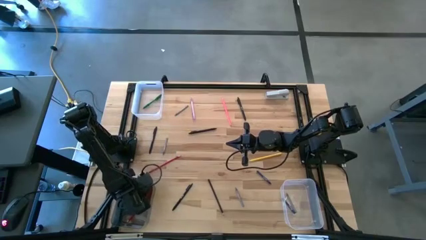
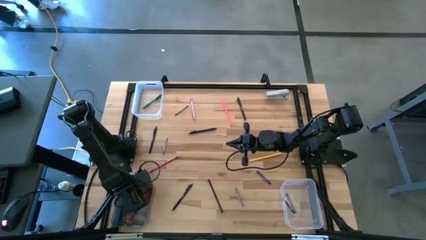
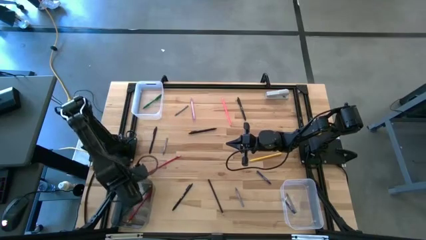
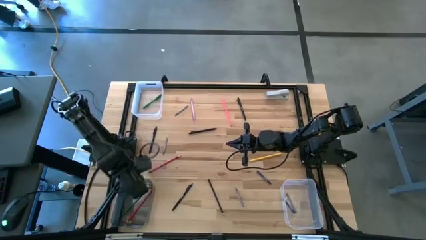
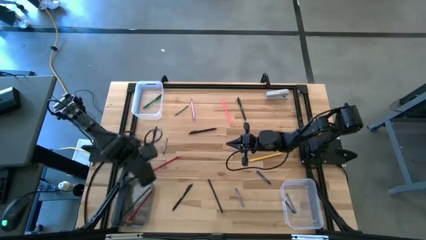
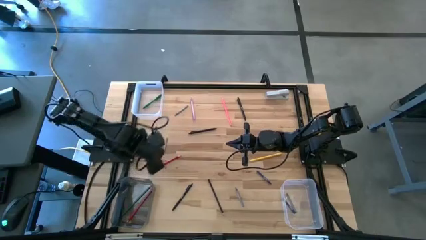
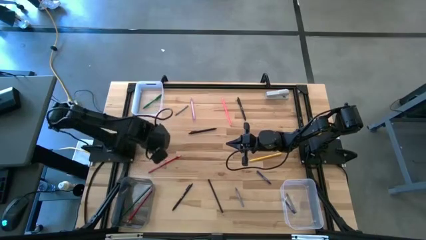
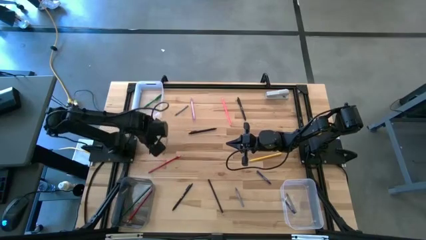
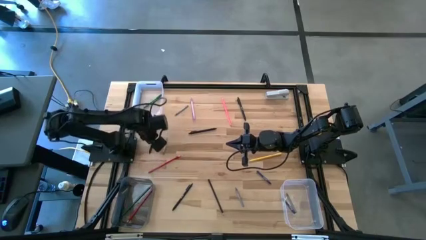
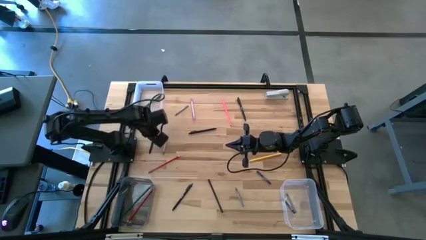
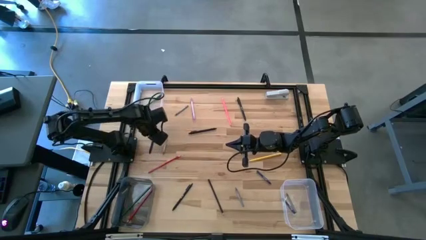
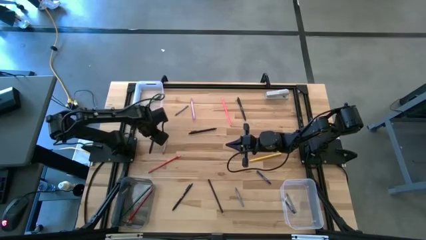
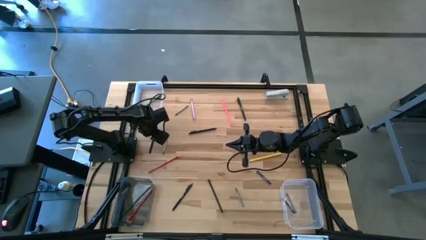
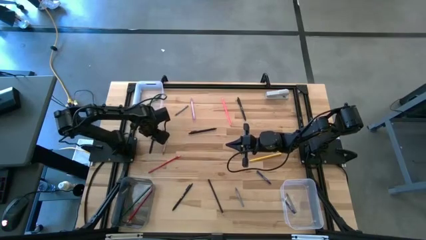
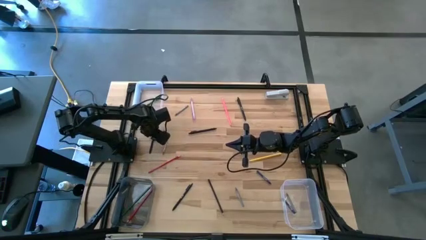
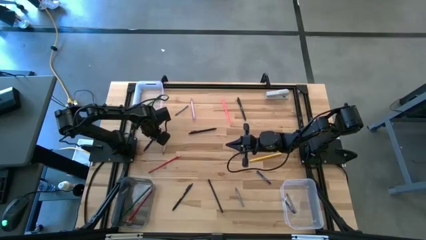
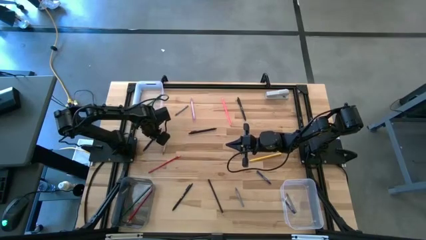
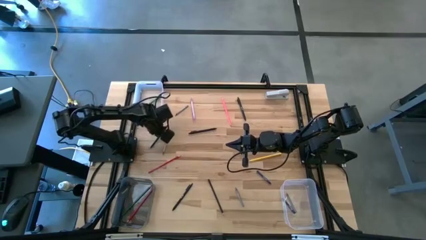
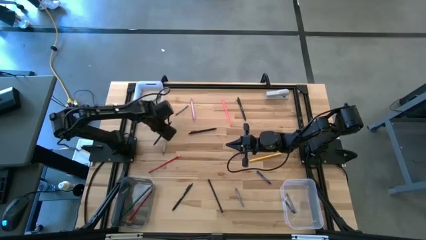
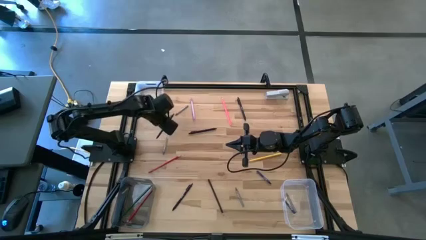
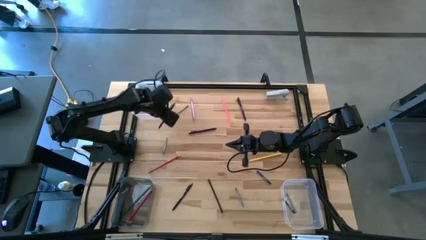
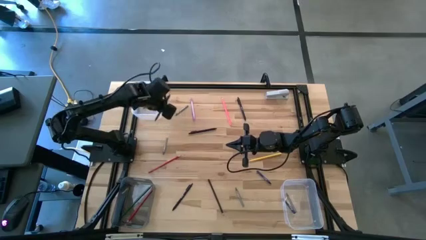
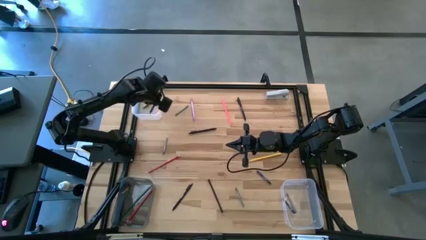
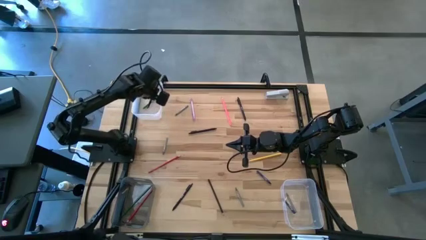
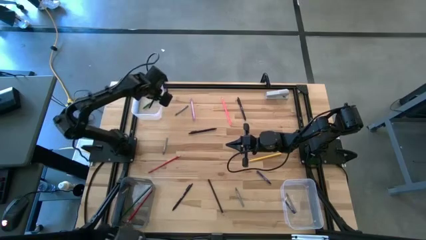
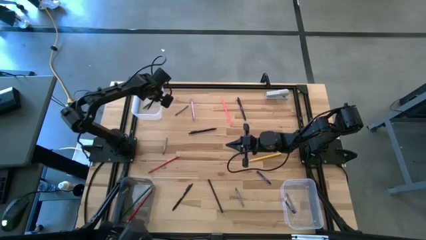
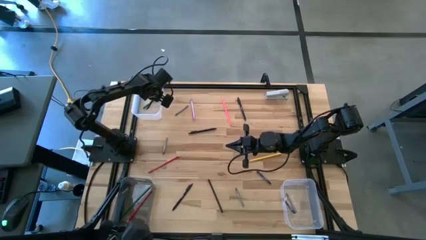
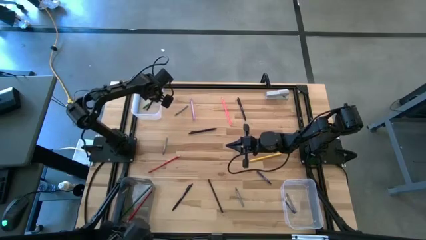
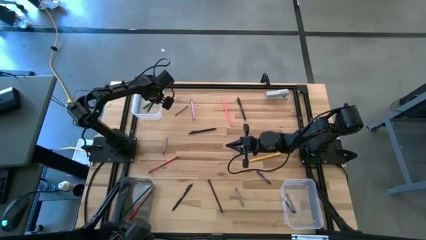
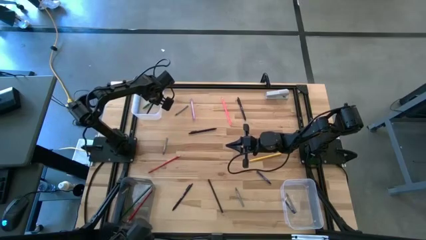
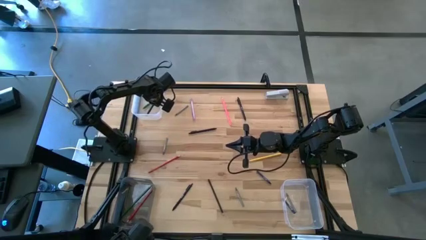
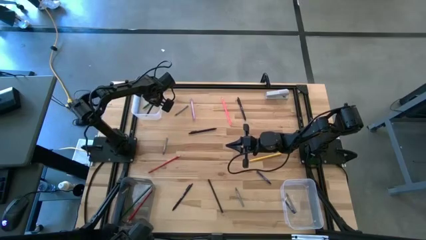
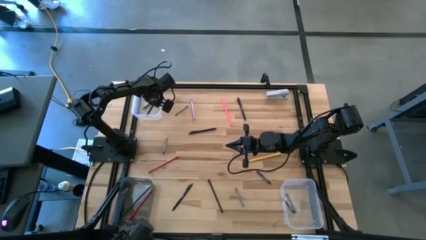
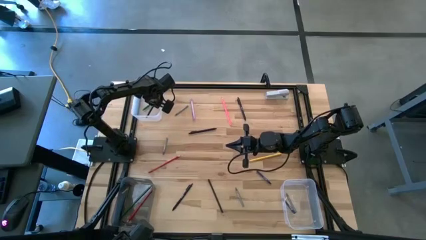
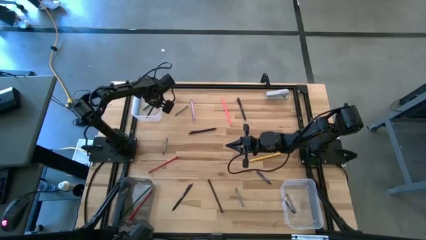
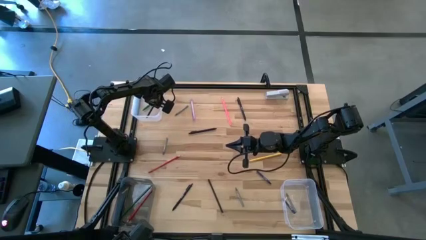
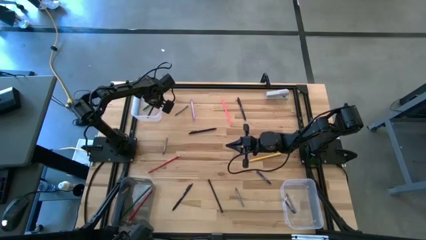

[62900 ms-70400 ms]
Task: Sort crayons/erasers/pens/pencils in bins
Put the middle left black pen into the top transparent bin

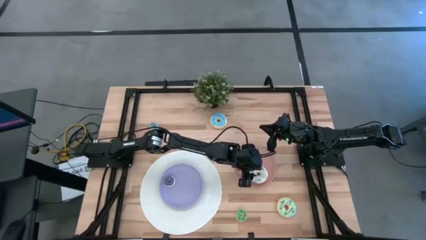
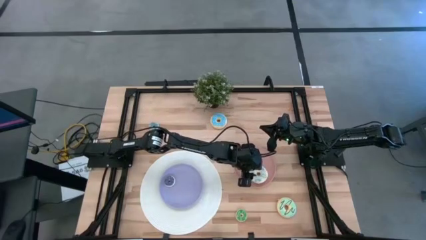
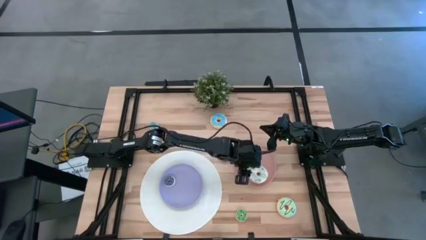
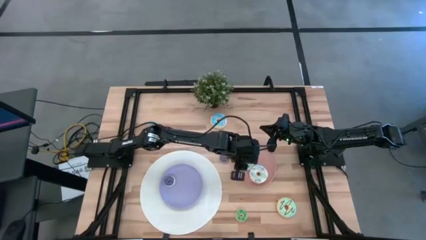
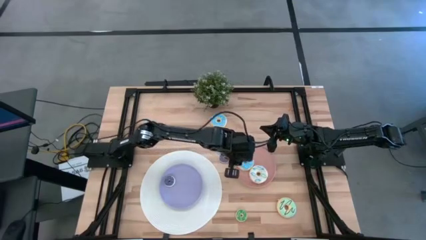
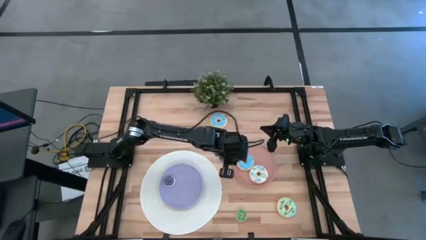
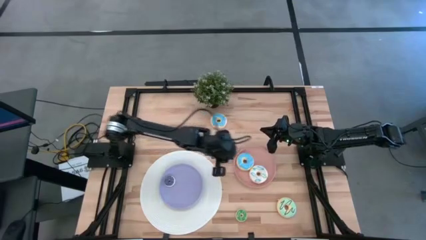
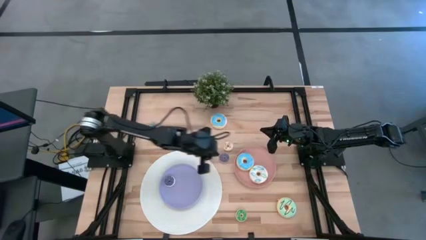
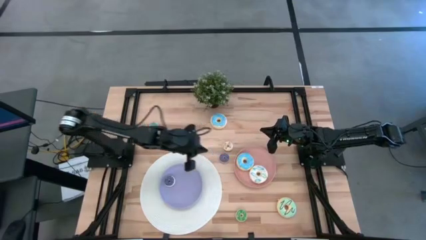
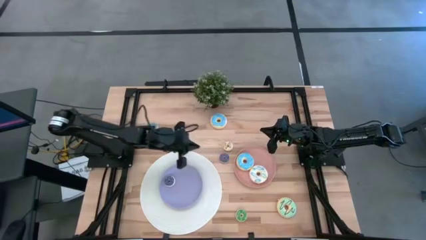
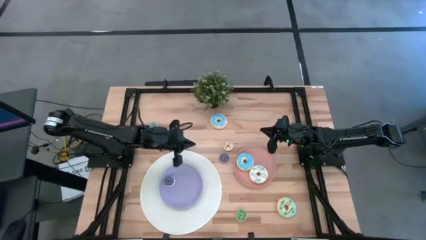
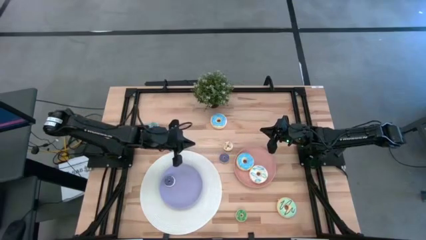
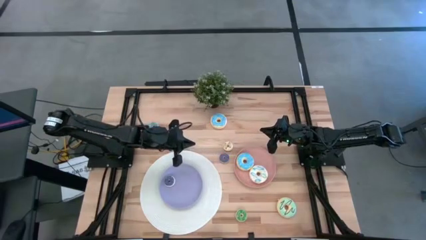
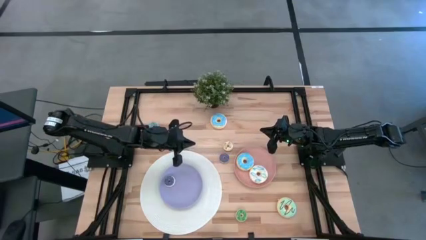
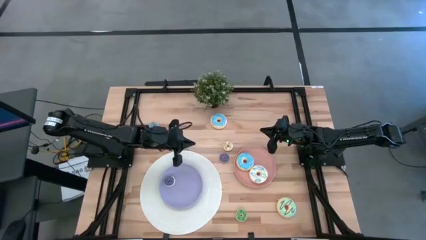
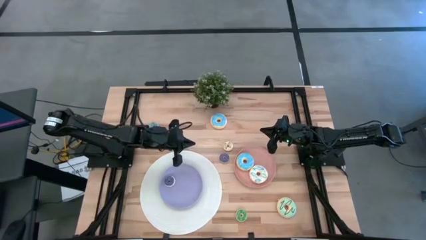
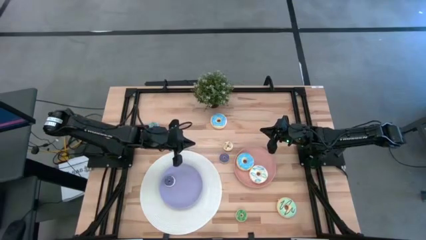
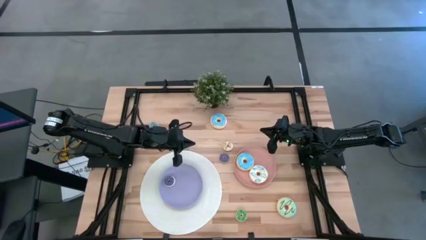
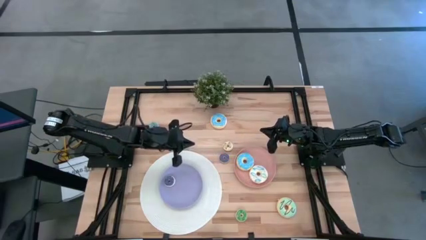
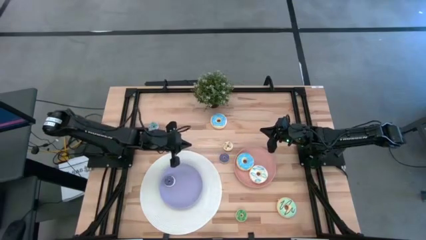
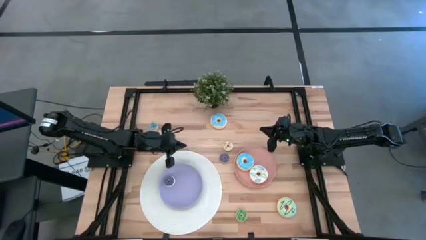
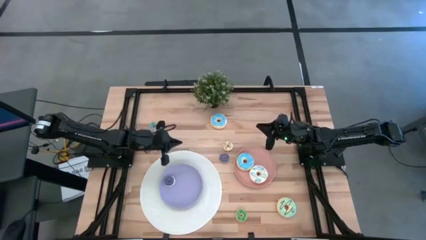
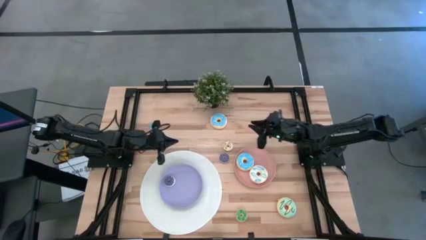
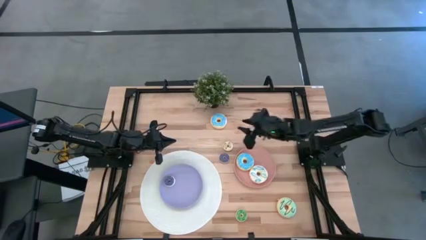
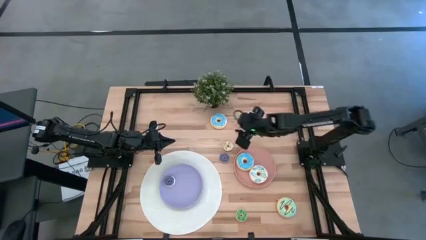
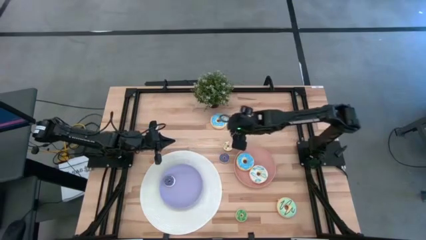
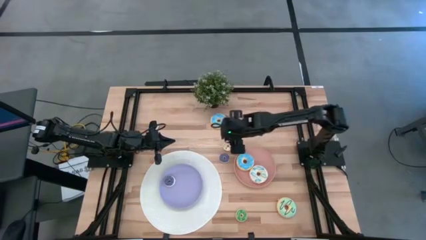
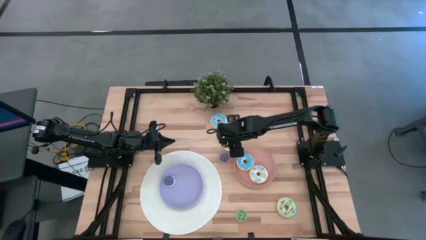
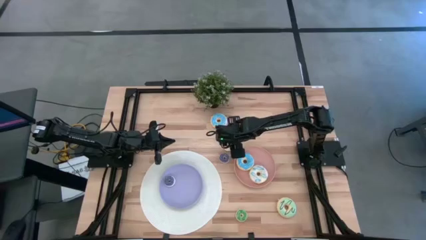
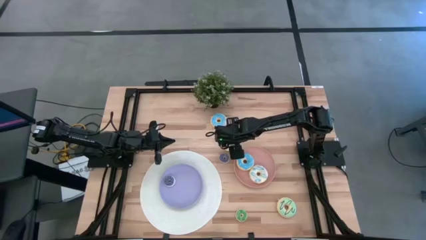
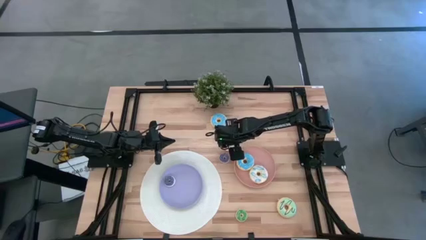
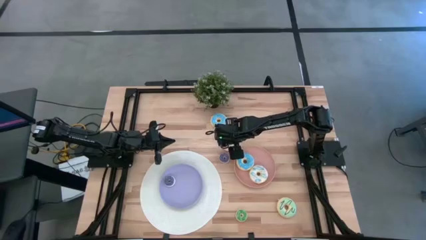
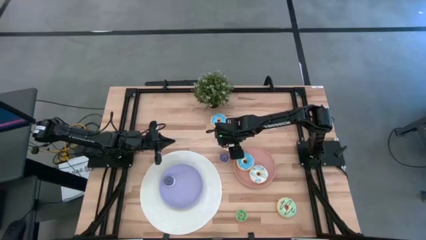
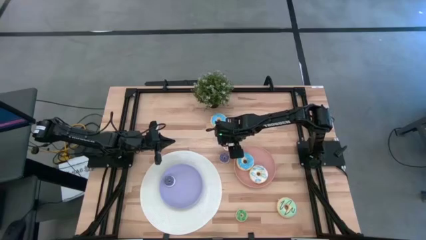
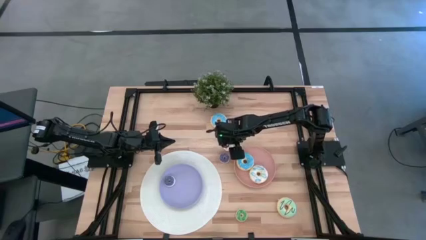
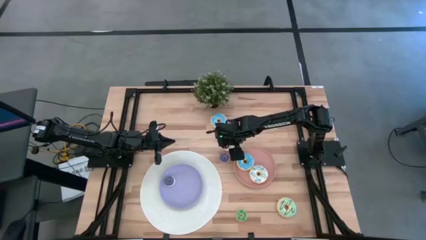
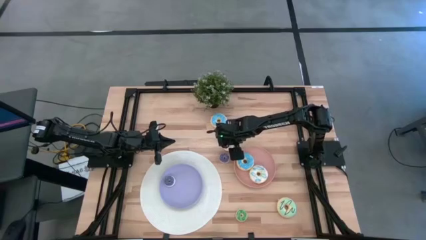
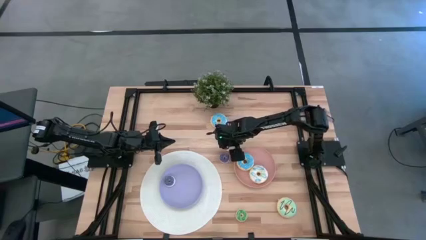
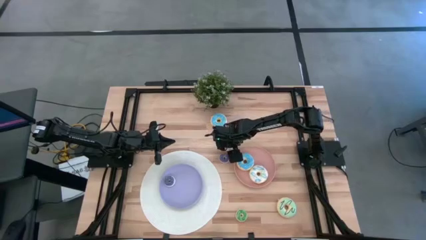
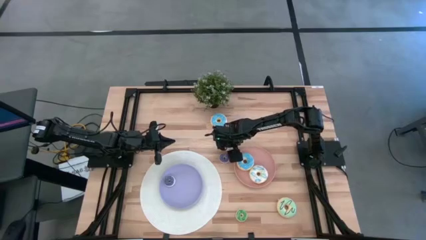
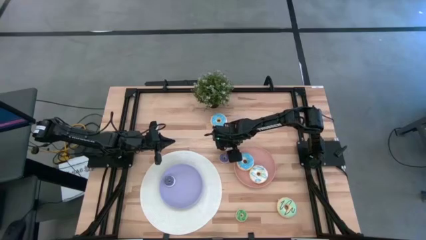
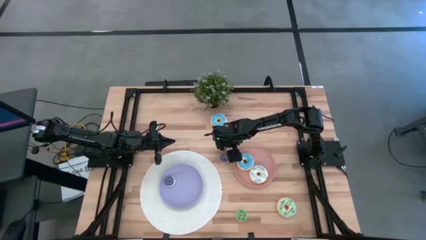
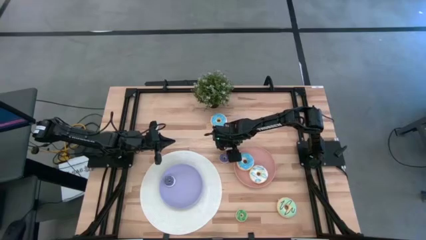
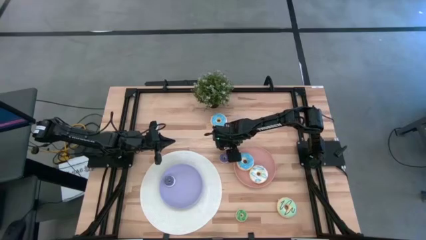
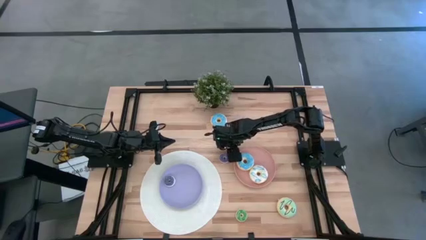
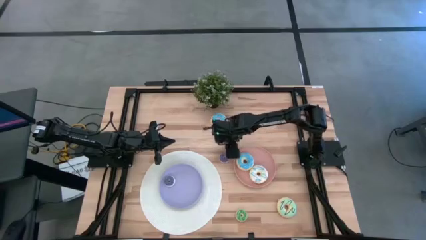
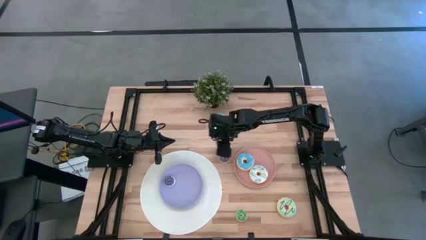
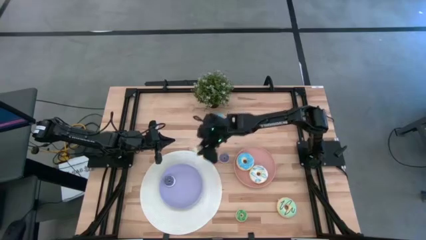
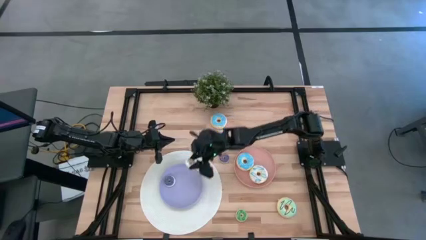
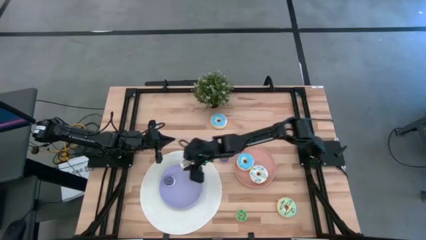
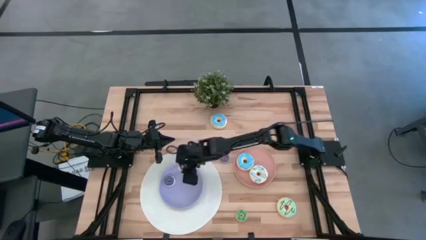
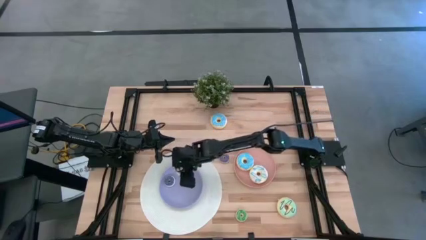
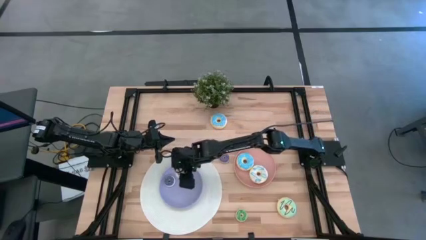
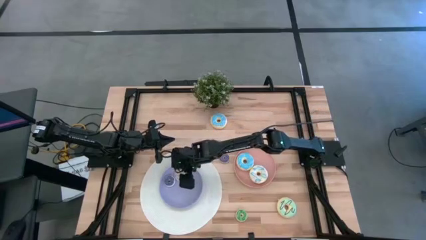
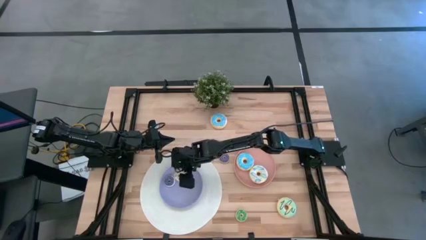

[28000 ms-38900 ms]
Task: Pick & Place donuts
Put the small white donut on the violet plate
